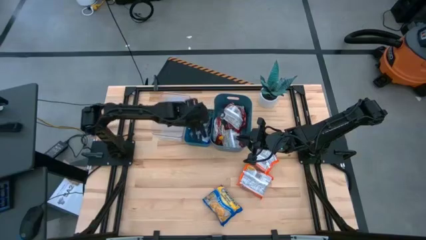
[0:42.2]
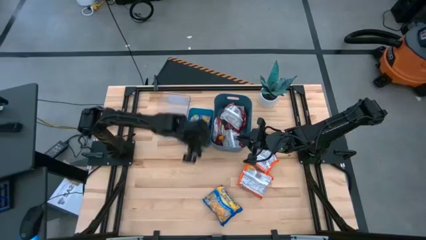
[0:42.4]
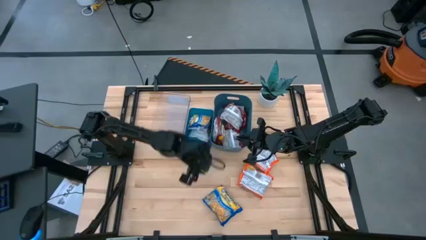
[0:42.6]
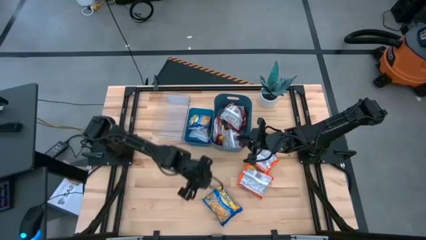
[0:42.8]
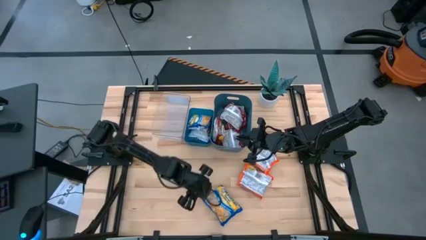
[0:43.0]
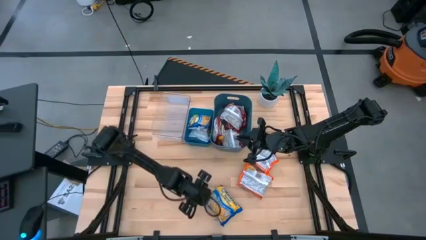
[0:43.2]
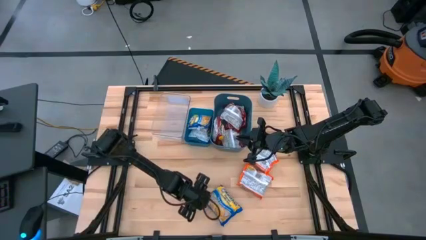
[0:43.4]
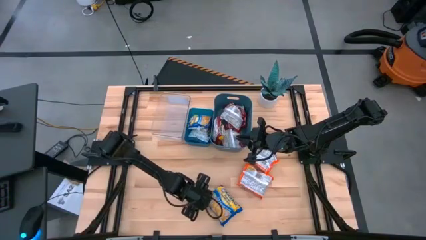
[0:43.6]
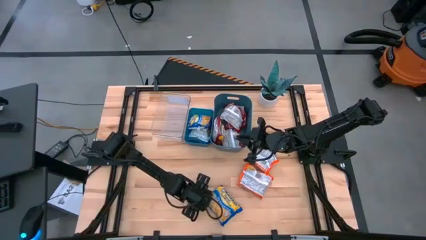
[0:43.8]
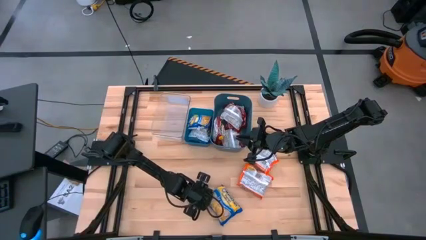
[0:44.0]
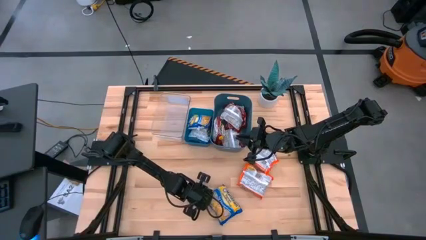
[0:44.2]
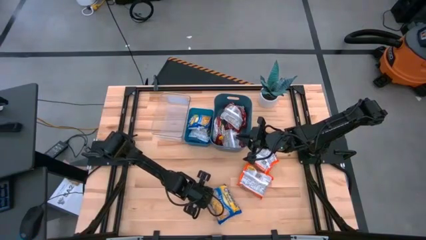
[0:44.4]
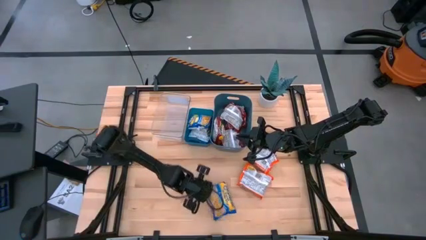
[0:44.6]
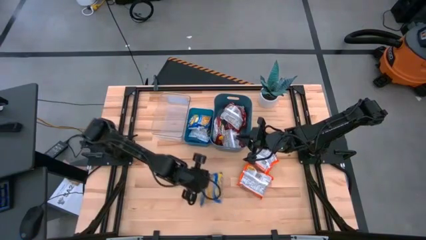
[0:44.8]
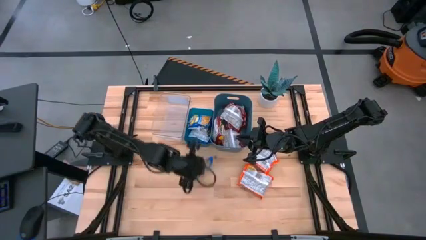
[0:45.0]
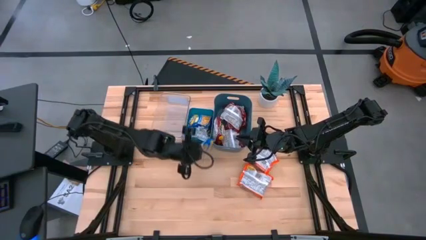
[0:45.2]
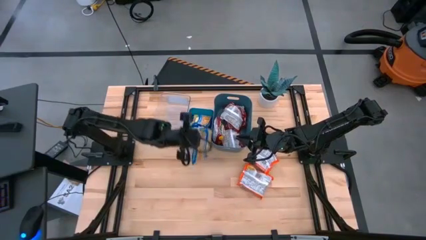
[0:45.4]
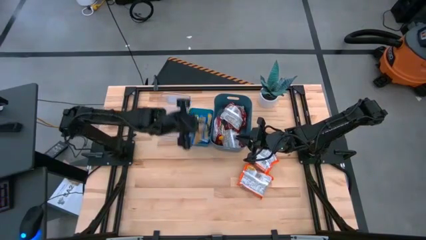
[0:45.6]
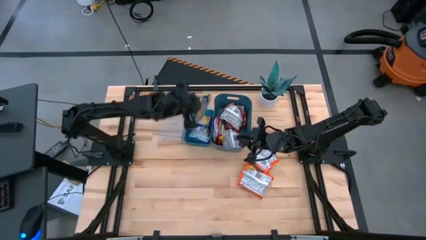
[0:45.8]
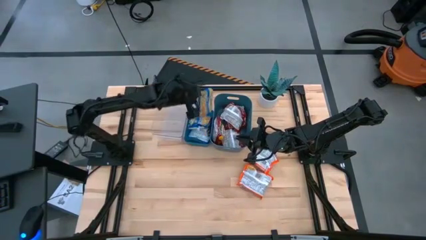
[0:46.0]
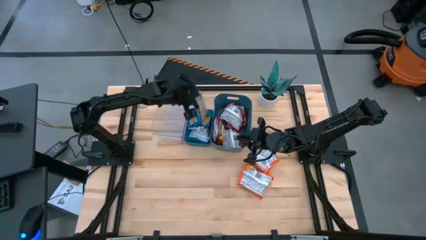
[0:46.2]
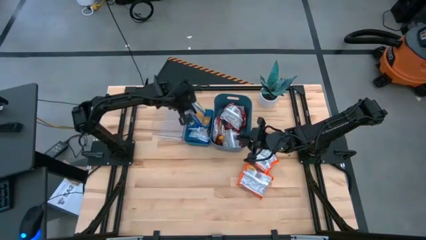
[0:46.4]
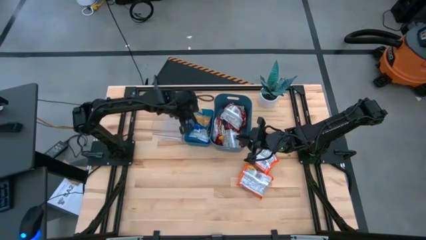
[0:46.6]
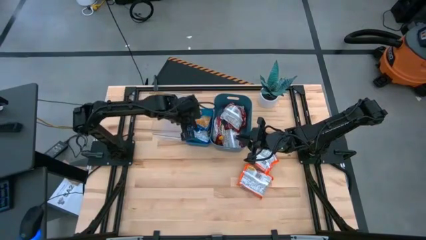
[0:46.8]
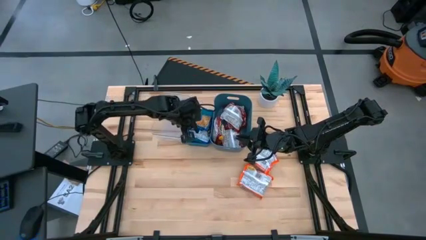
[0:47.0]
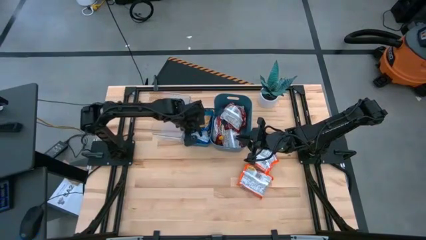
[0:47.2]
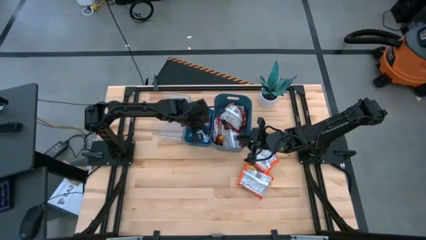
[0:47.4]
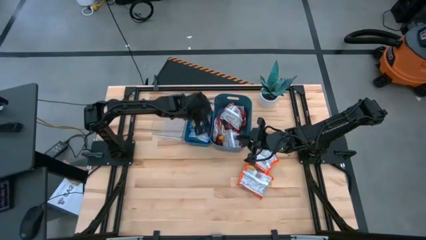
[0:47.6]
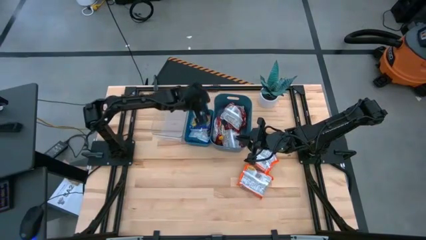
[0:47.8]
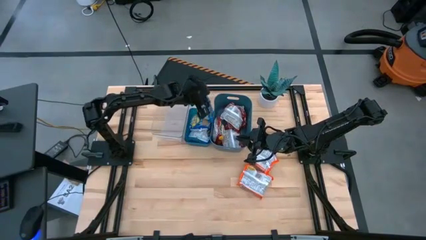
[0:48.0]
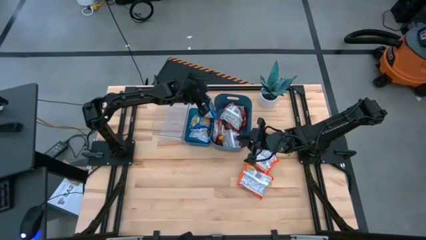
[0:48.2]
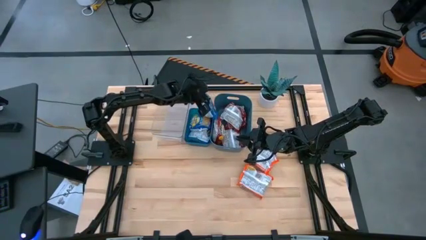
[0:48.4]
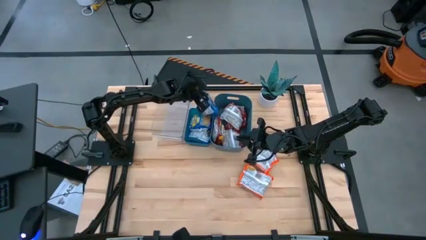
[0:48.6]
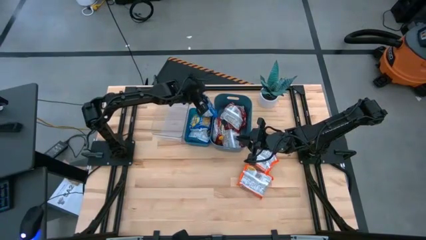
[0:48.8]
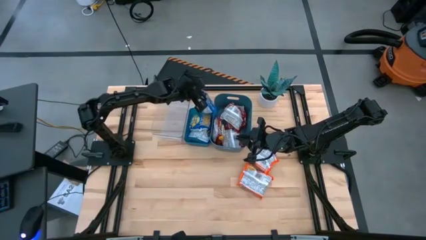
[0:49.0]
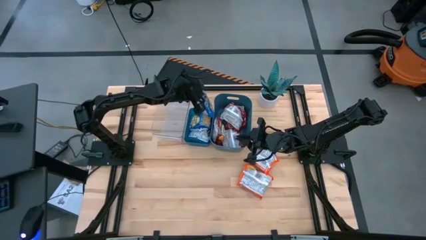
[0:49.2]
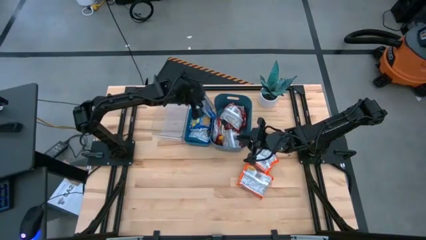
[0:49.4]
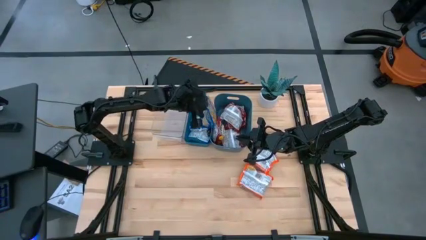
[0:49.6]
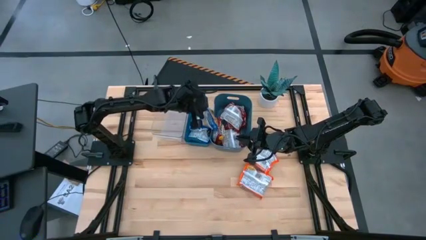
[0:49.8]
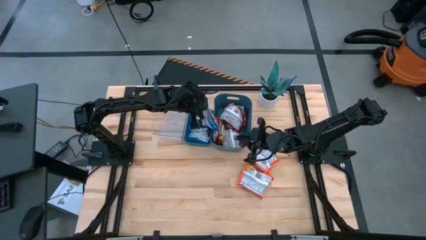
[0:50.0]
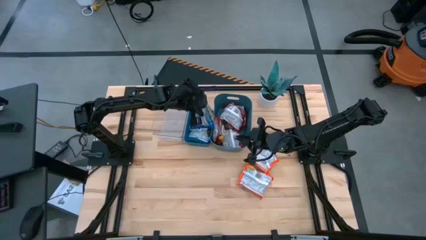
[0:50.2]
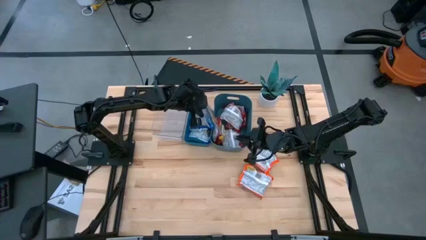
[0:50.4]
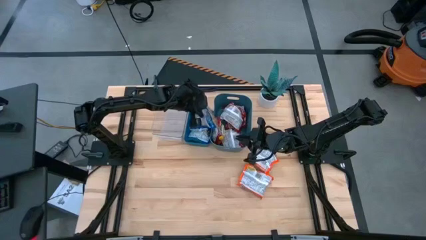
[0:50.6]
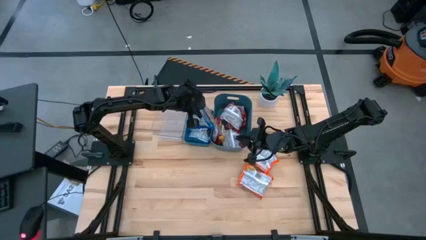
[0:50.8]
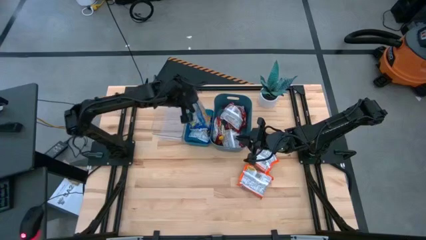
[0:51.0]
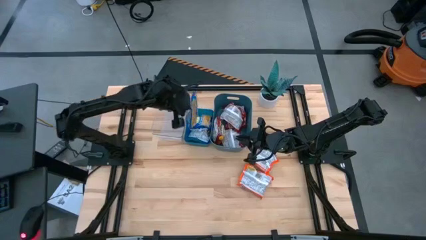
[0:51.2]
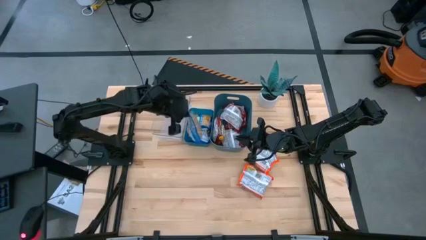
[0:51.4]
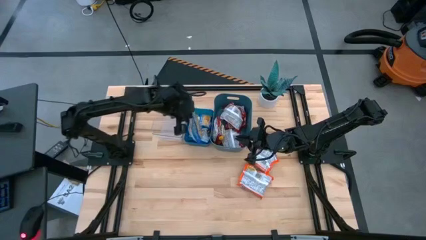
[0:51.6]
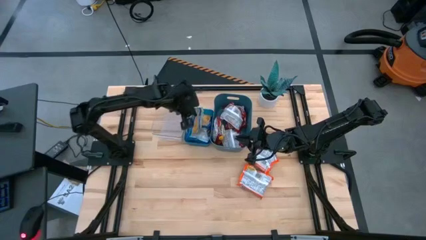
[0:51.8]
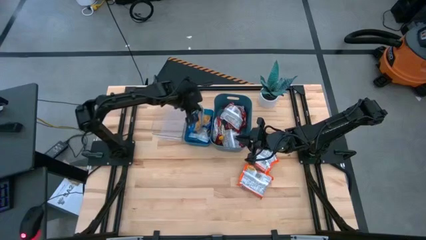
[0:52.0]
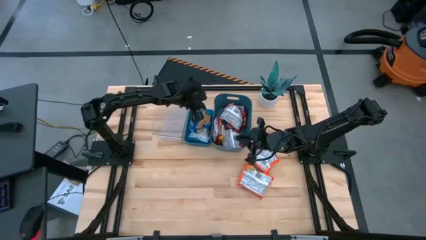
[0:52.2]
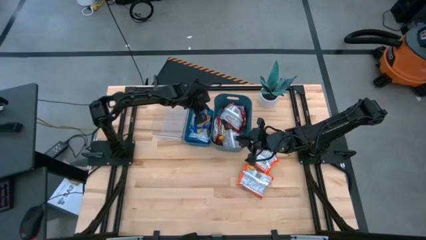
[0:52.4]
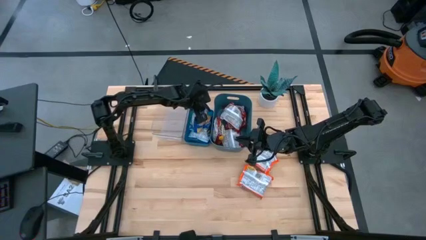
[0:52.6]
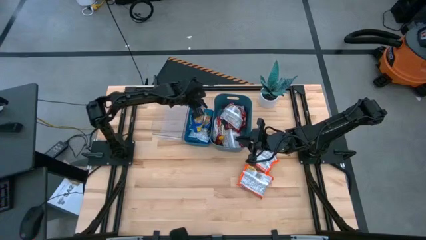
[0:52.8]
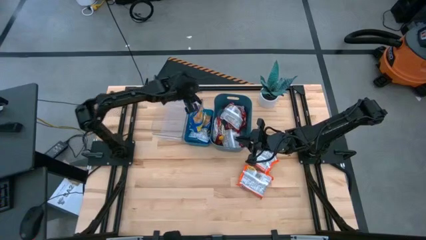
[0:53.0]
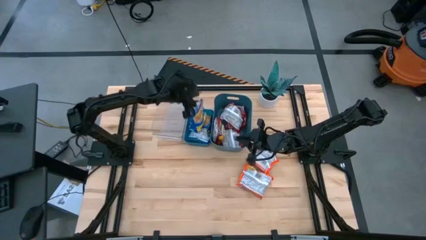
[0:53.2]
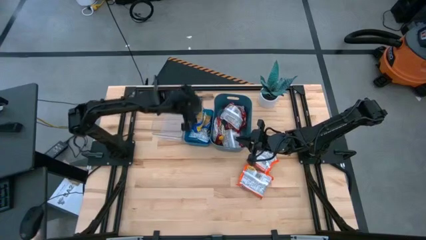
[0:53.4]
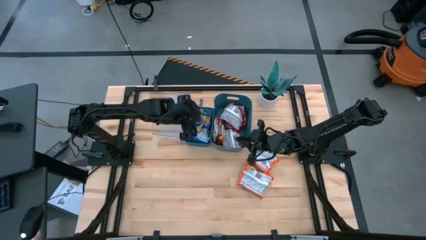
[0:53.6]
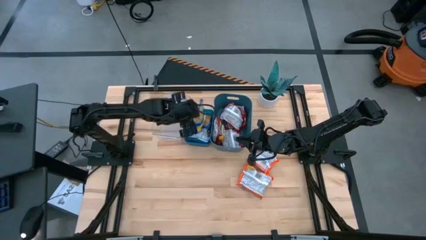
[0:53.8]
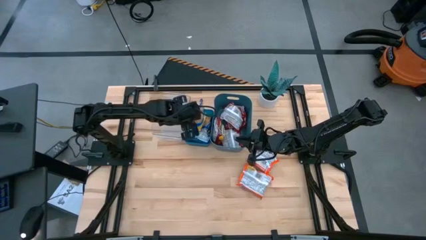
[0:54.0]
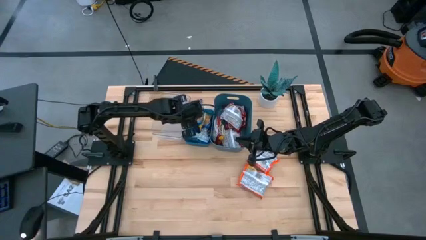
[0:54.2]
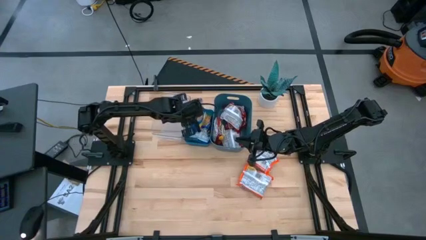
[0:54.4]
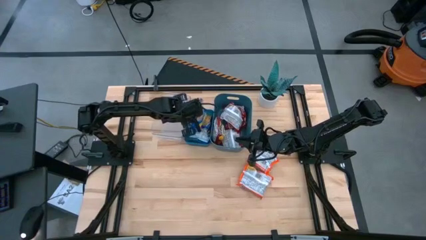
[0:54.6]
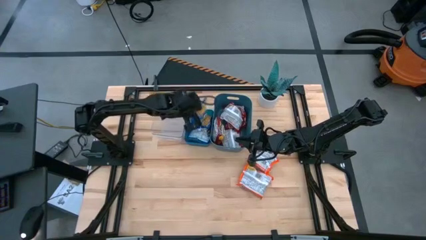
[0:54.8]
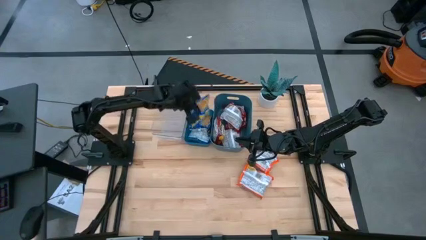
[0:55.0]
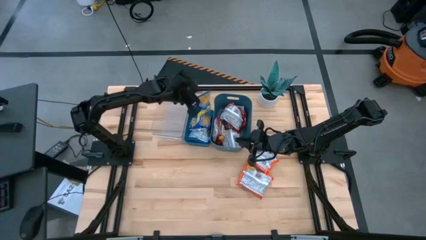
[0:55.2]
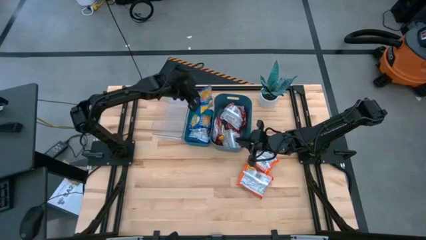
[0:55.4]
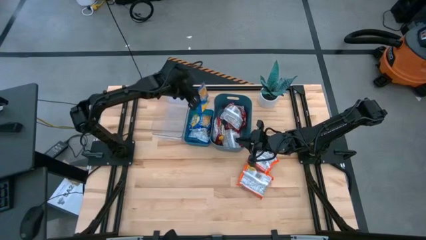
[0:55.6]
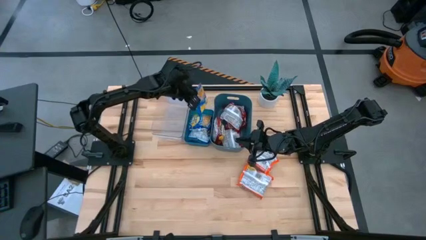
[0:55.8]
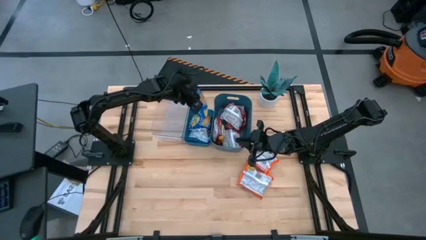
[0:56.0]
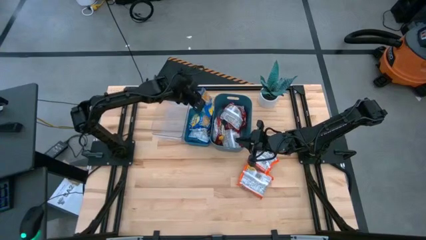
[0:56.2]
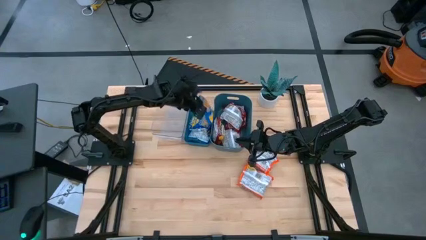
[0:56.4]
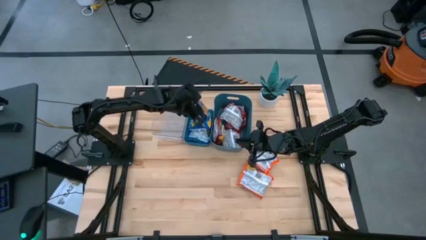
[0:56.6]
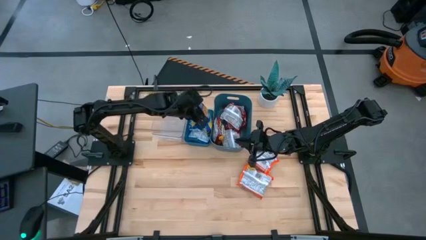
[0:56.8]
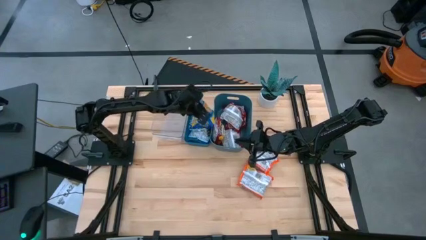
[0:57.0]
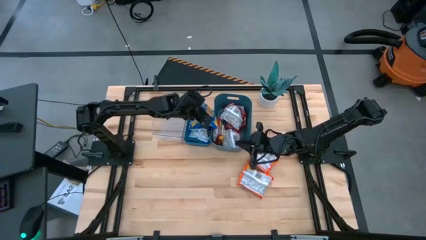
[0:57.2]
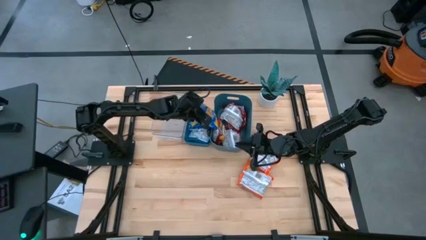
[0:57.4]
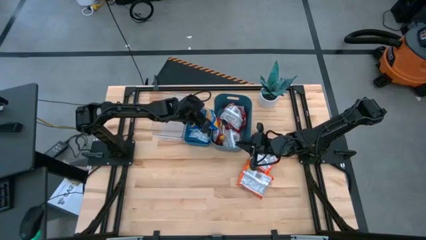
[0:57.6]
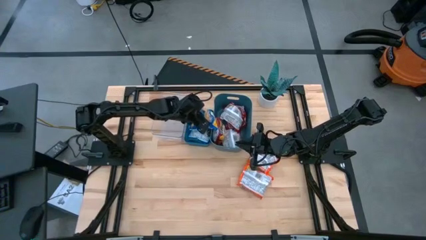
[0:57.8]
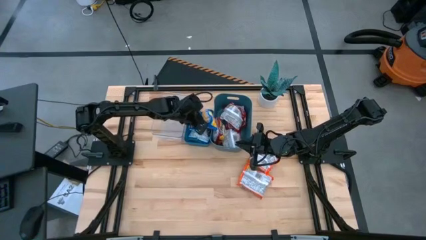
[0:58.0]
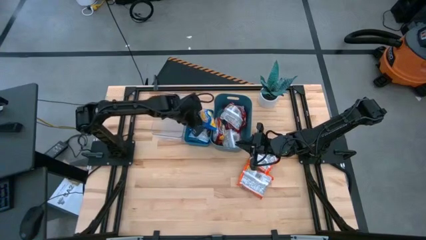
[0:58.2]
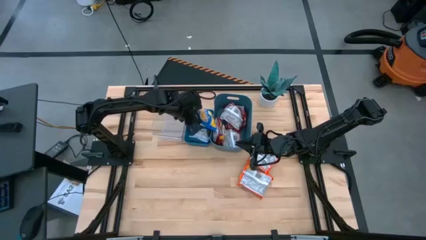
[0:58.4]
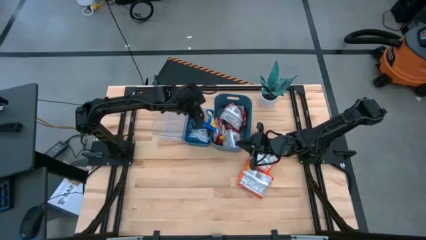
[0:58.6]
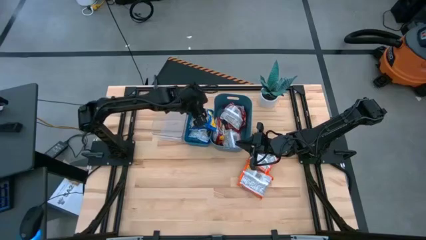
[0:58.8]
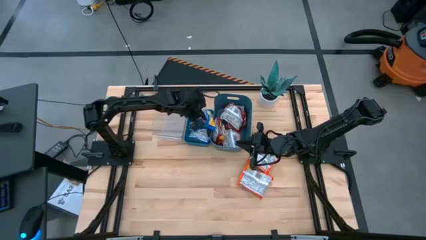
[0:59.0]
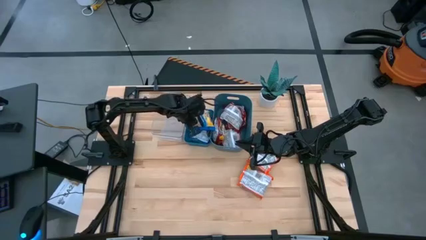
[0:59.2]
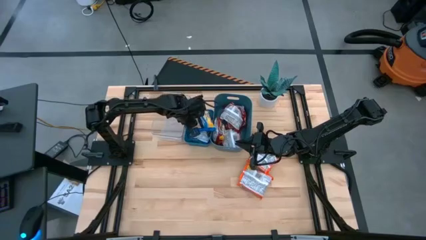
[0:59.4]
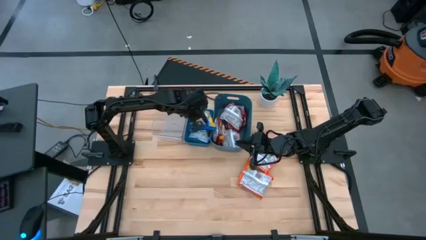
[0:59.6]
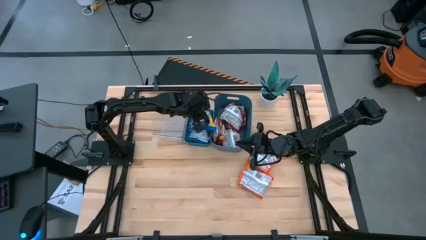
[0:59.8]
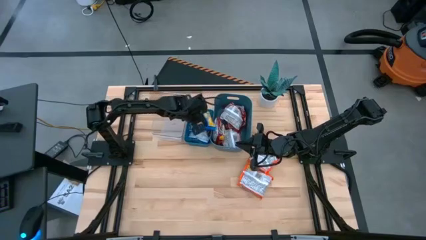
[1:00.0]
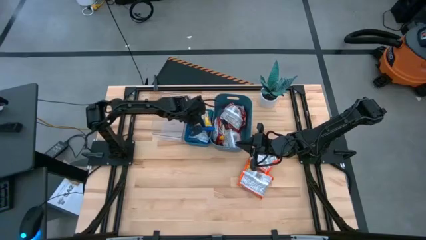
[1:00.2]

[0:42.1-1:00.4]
Task: Sort Maruchan noodles
Put the blue noodle pack into the blue bin
